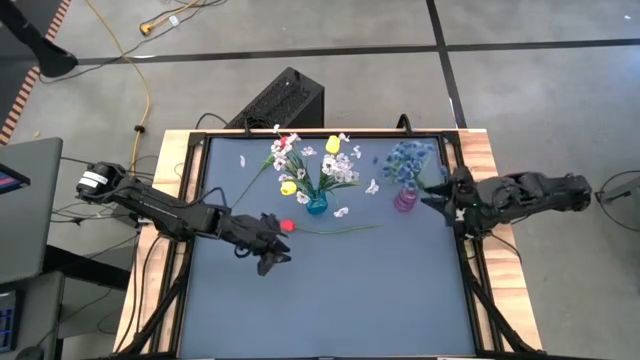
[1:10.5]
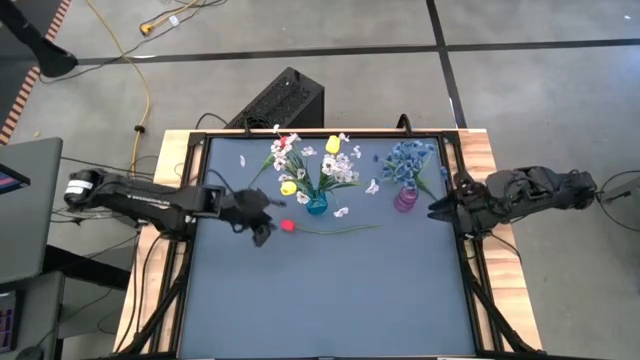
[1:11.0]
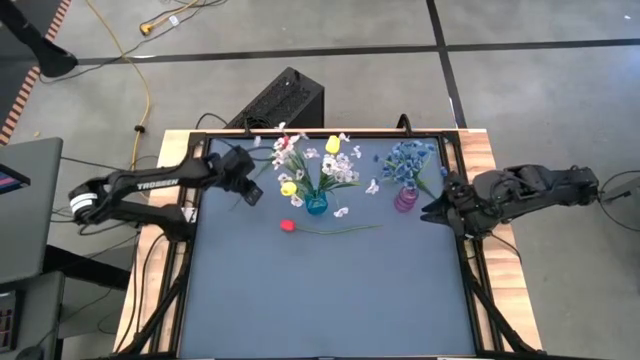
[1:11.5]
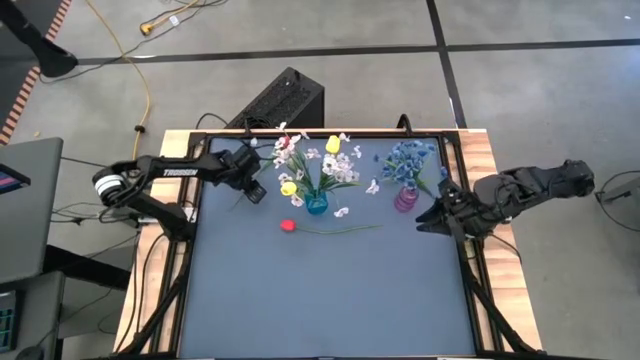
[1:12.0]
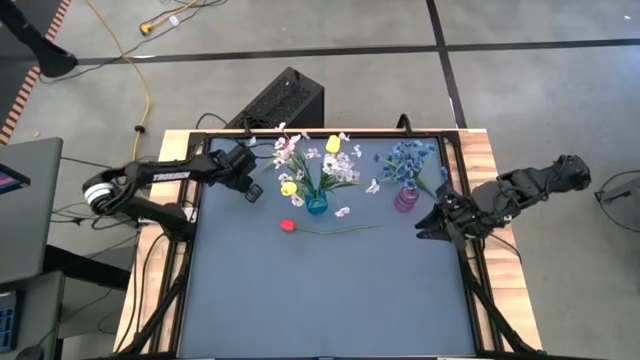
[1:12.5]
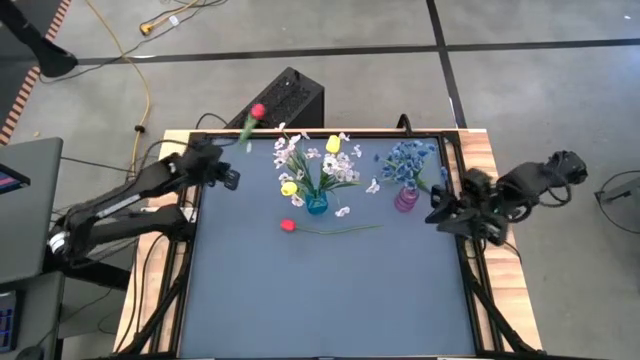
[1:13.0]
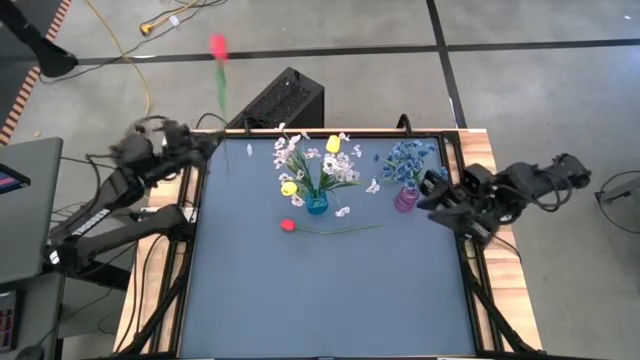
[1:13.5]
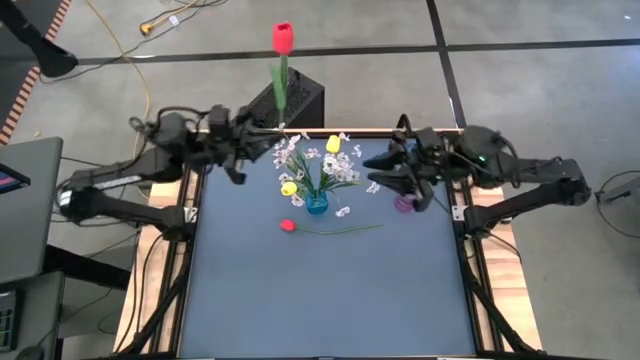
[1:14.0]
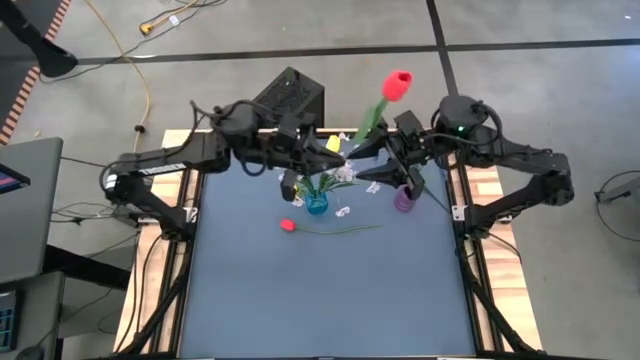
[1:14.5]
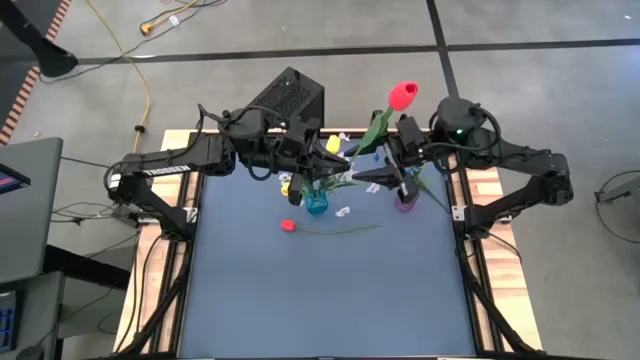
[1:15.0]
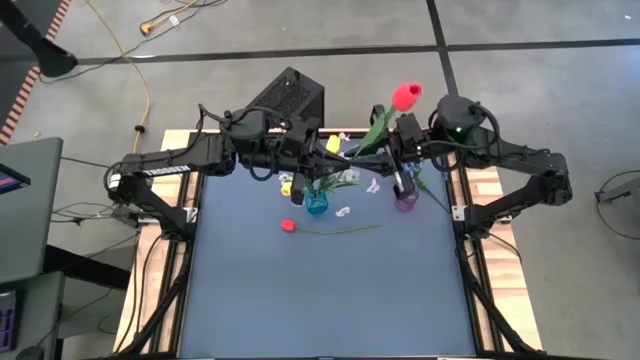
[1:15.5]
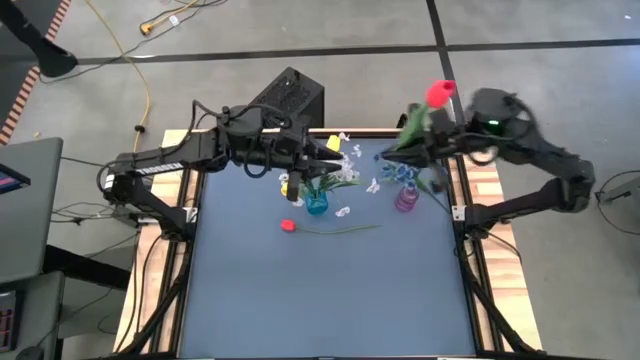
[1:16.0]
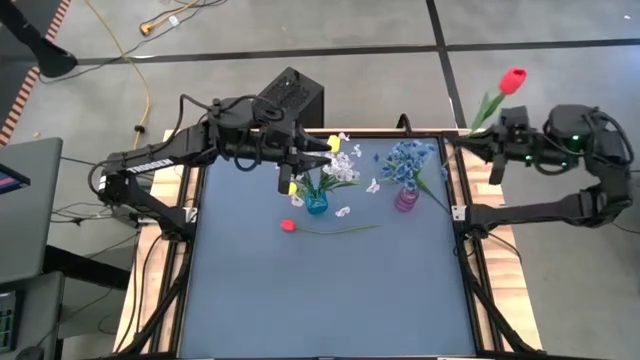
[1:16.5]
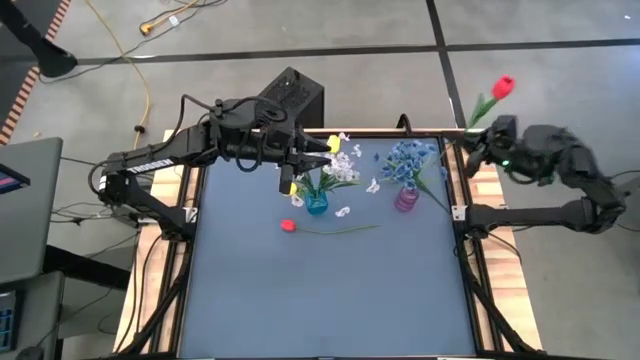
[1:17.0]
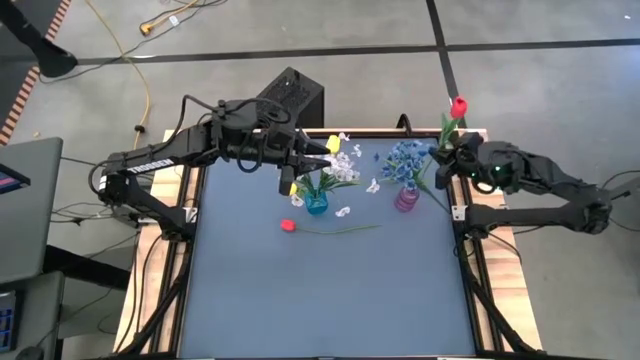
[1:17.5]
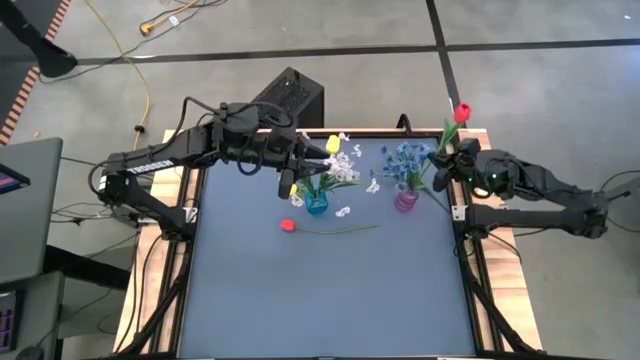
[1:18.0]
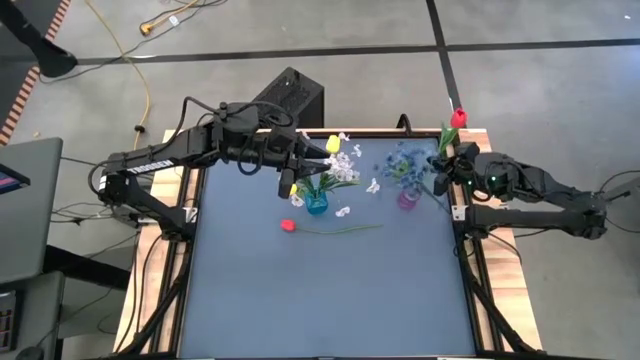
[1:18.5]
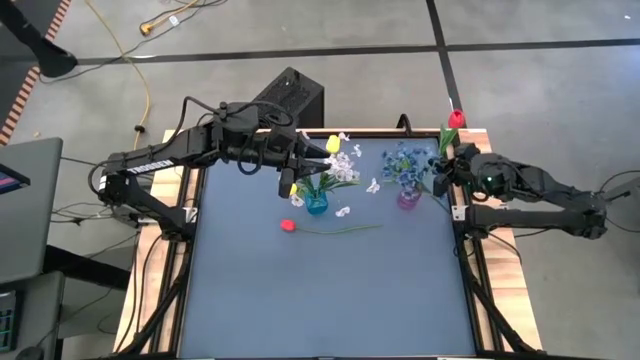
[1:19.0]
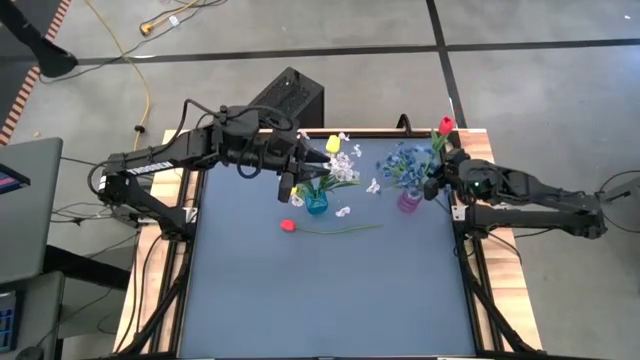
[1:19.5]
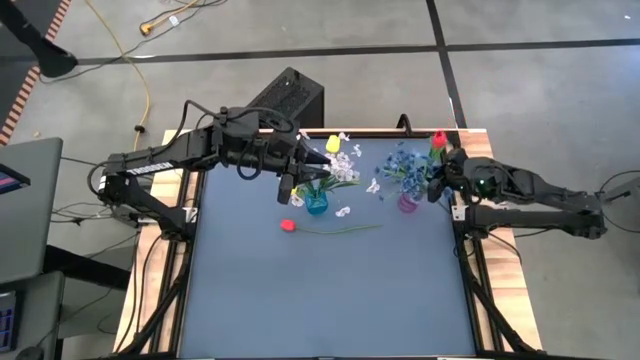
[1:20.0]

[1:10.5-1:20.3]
Task: Sort flowers into vase by color
Put the top red flower into the violet vase
